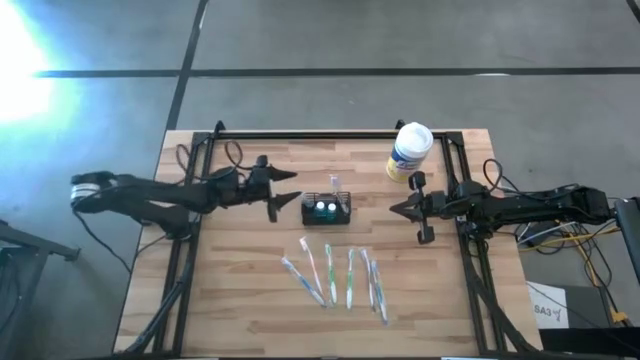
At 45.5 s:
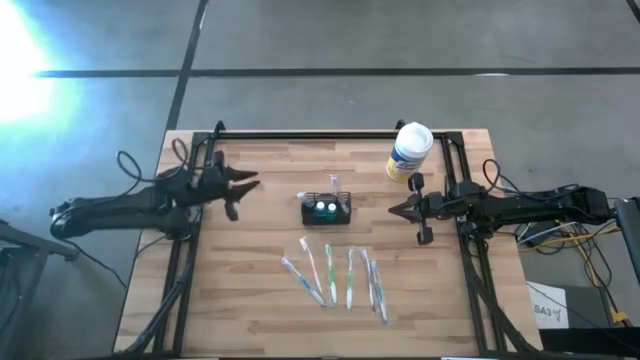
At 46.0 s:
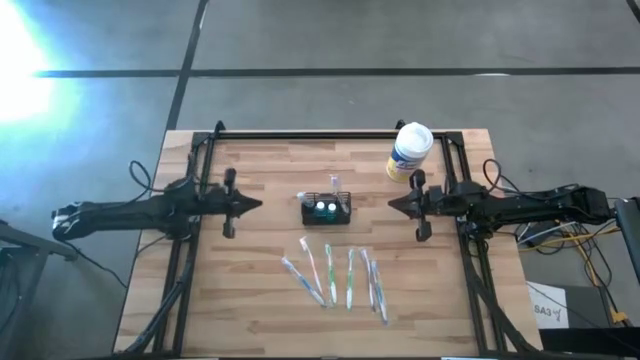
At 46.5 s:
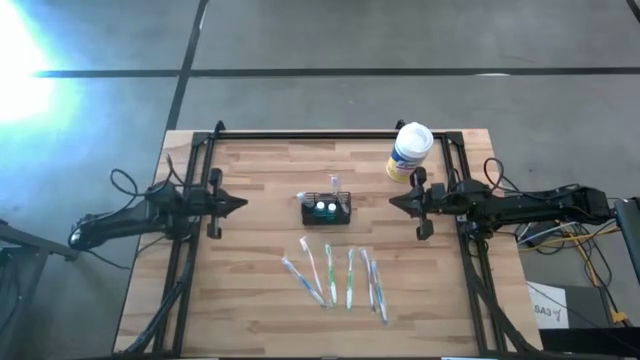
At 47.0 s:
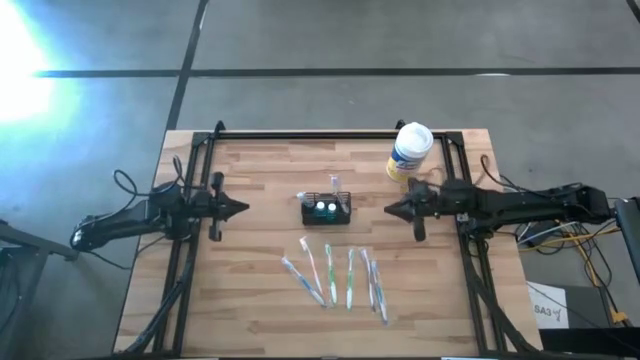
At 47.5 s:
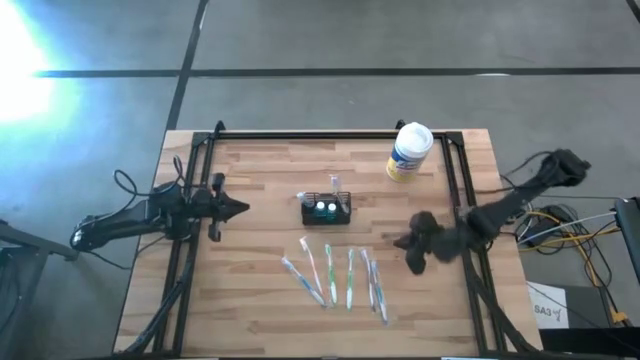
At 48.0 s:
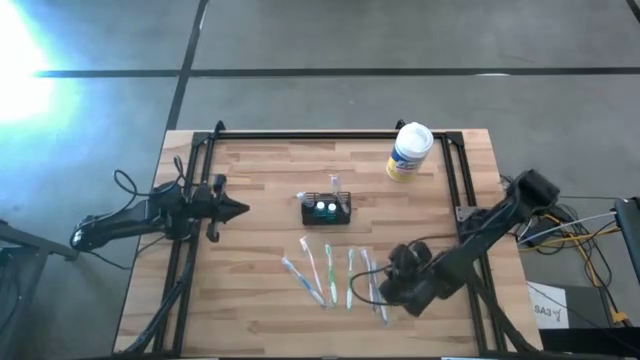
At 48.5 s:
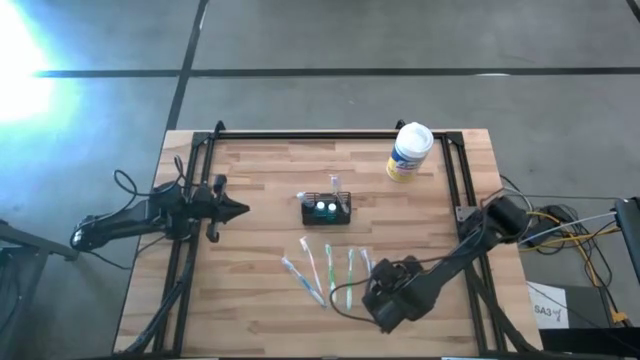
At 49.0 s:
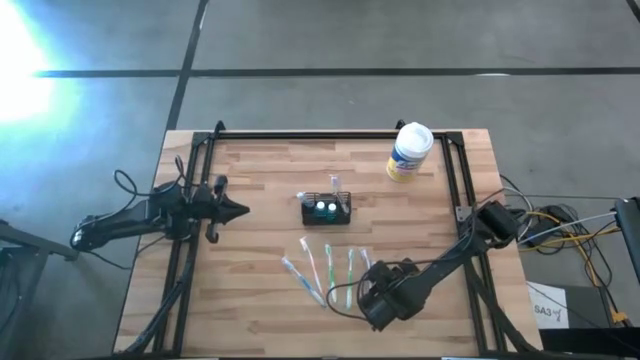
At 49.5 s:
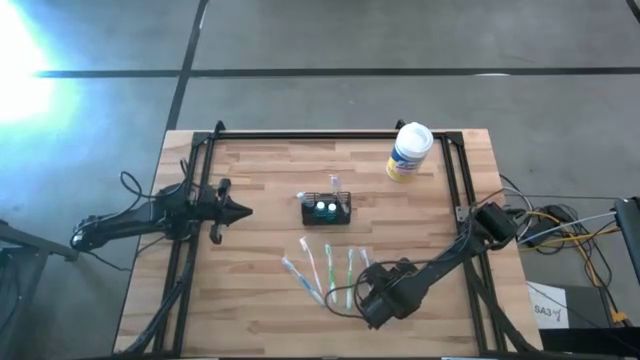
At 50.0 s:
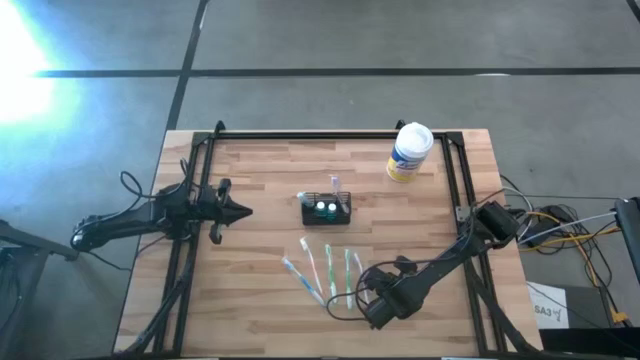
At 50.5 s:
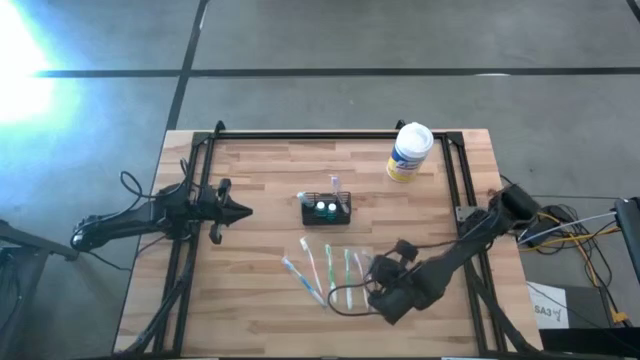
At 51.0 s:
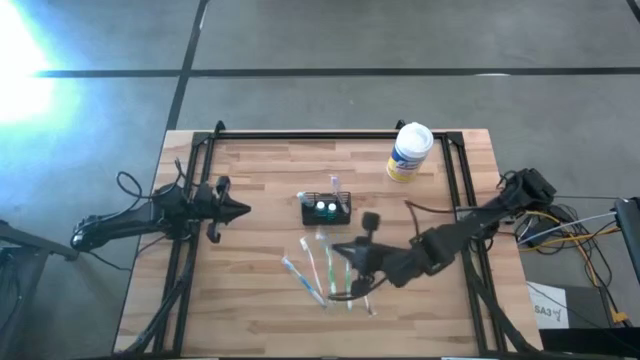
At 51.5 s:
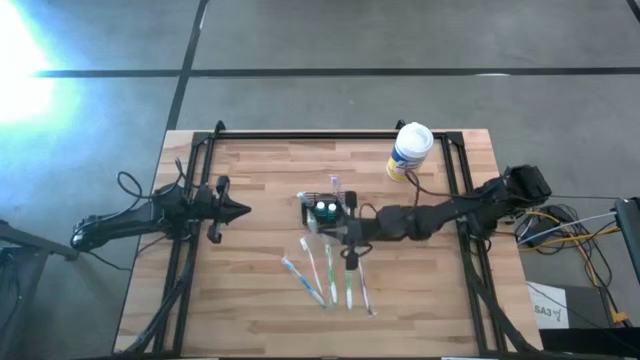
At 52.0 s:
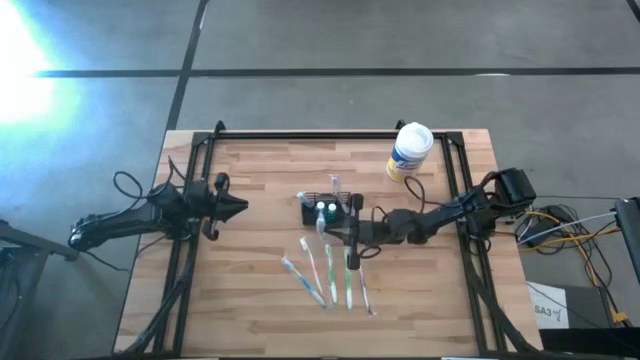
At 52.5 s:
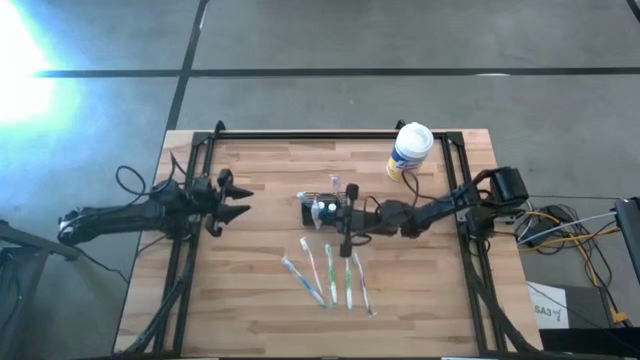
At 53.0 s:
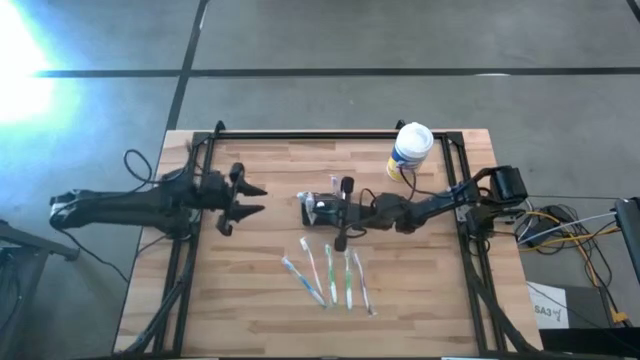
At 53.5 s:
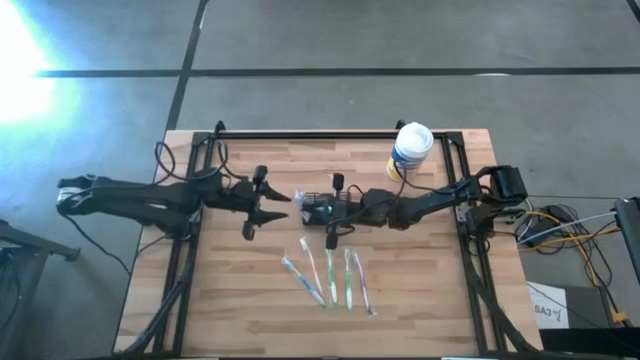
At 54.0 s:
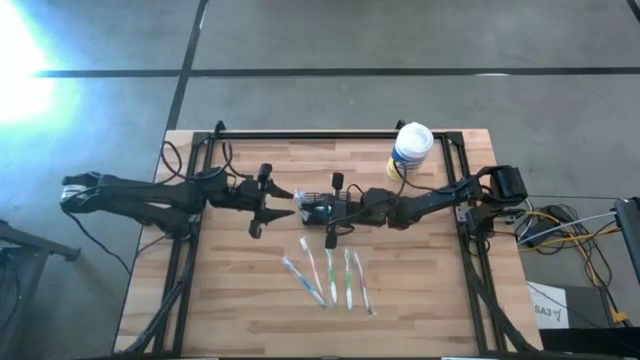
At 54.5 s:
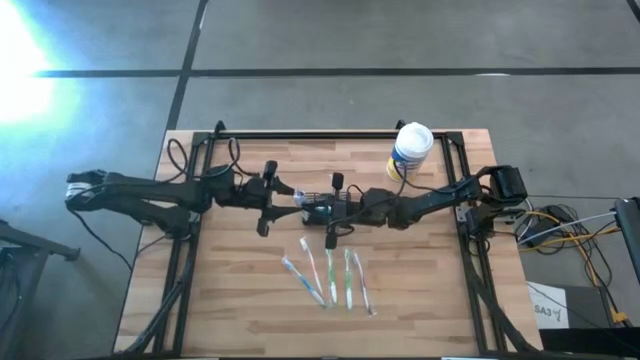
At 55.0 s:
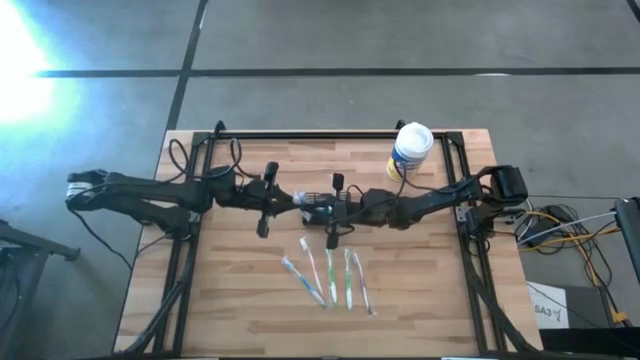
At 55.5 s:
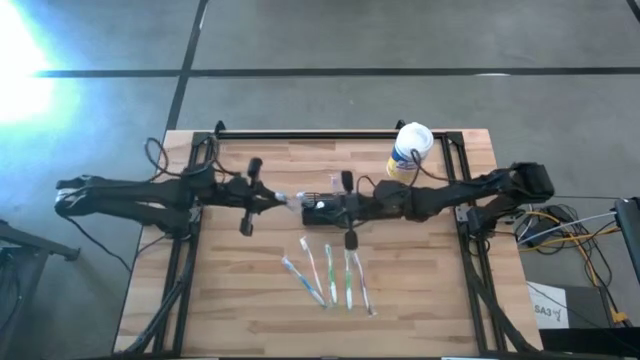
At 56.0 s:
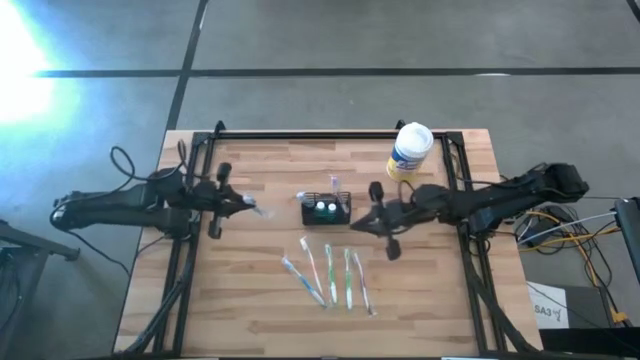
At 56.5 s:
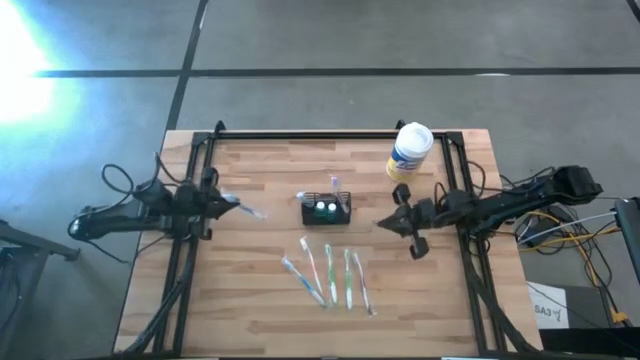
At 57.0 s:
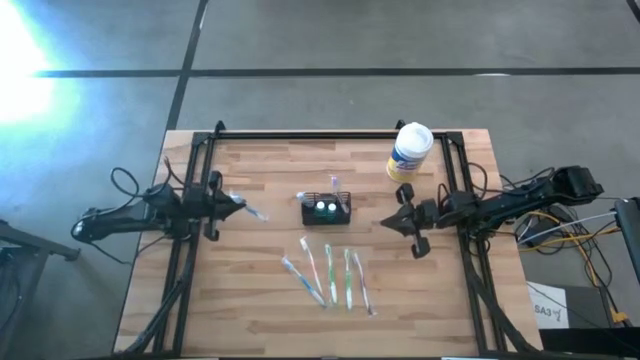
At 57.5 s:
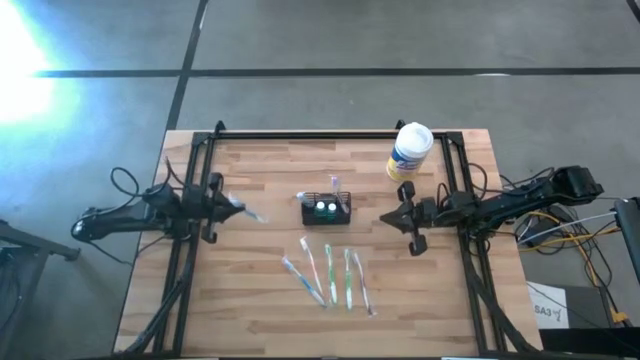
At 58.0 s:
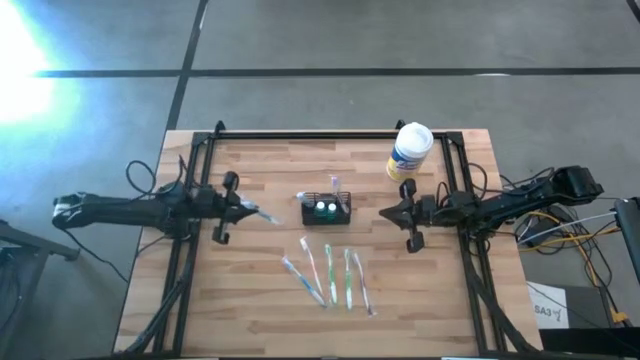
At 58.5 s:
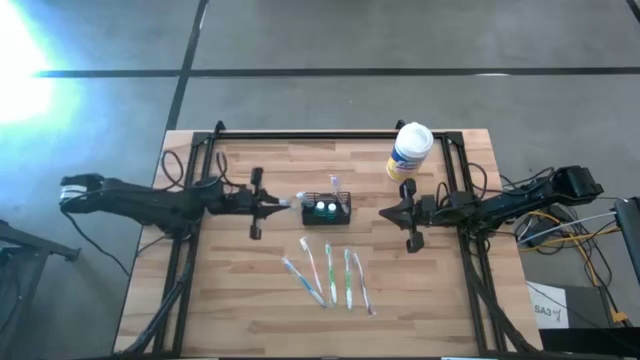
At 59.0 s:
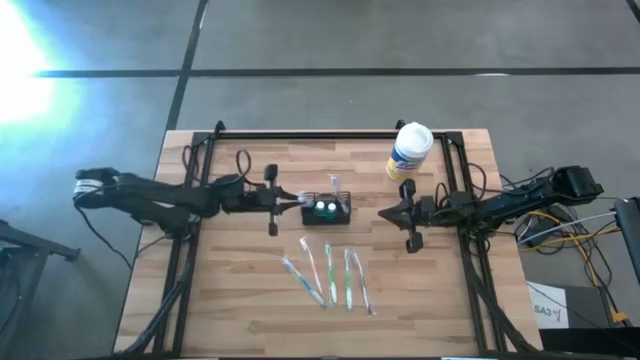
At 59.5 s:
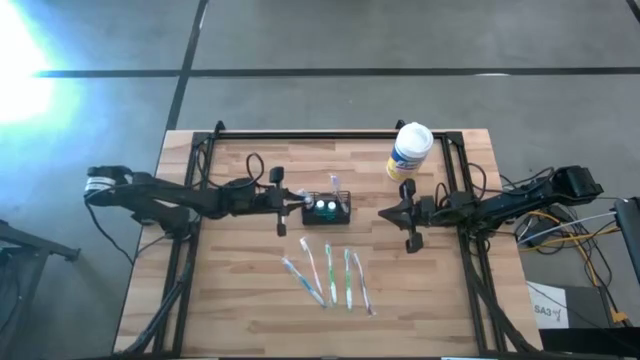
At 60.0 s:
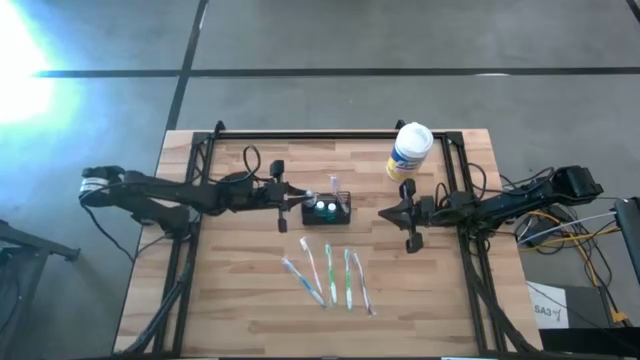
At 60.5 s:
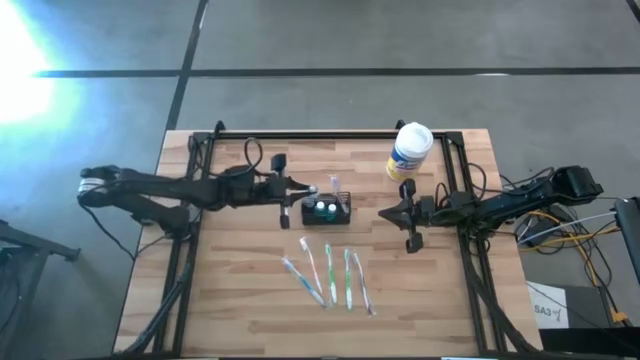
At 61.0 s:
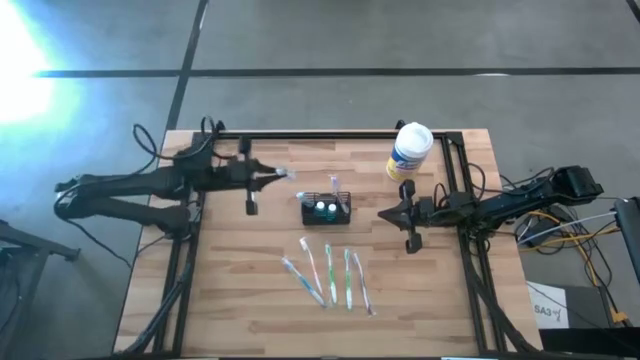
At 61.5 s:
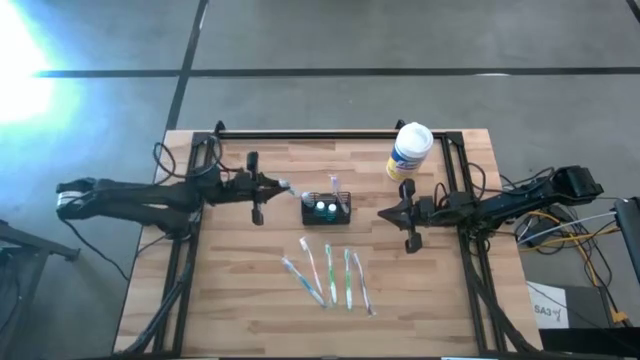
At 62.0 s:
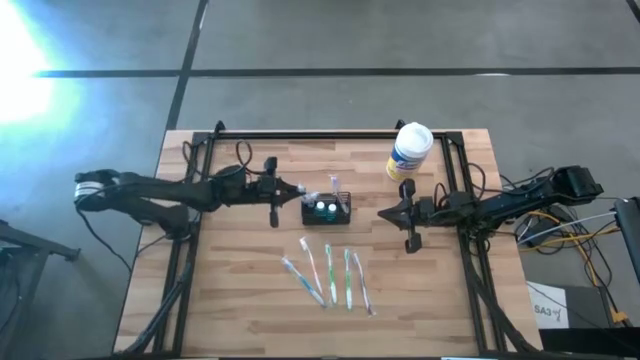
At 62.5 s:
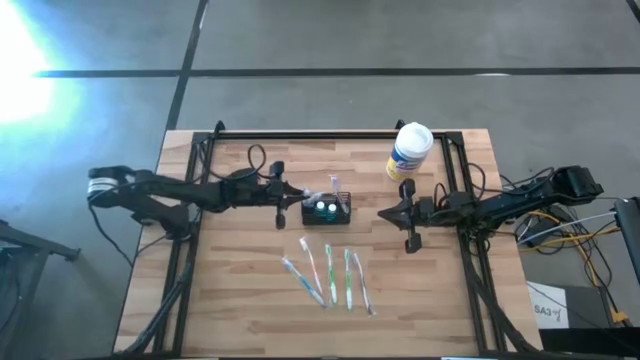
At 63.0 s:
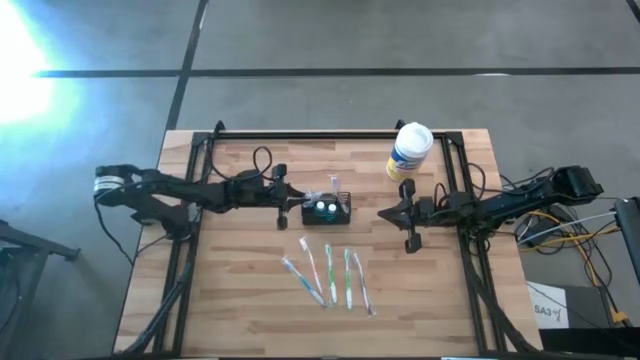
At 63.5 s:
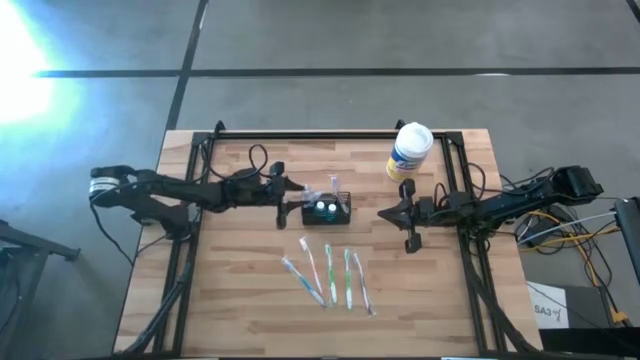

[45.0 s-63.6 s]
Task: Pick & Place toothbrushing station
Put the right blue toothbrush into the black wire organizer

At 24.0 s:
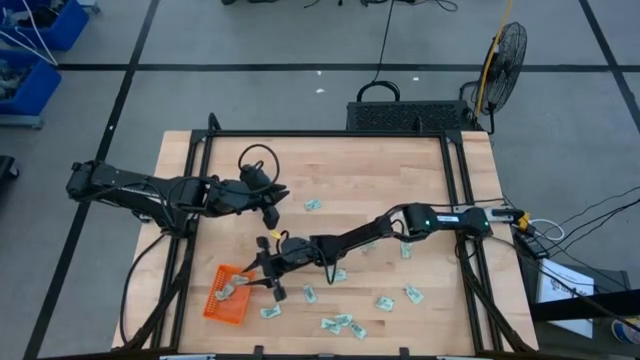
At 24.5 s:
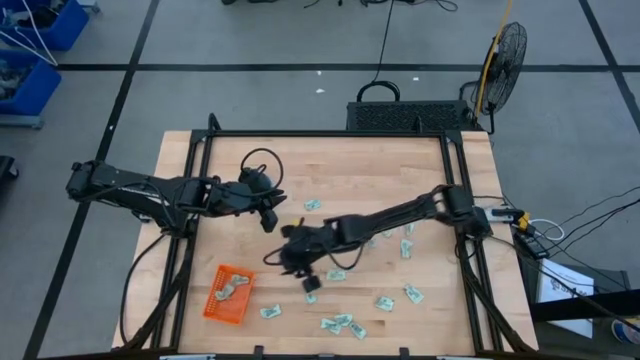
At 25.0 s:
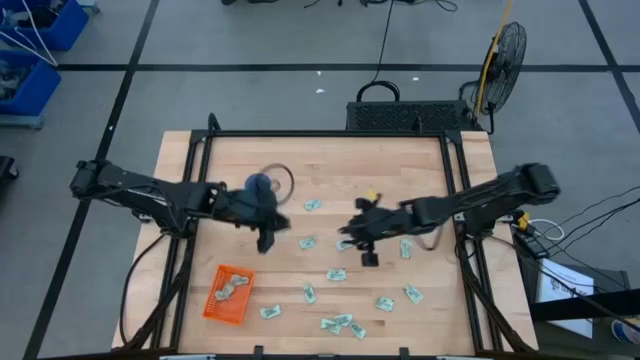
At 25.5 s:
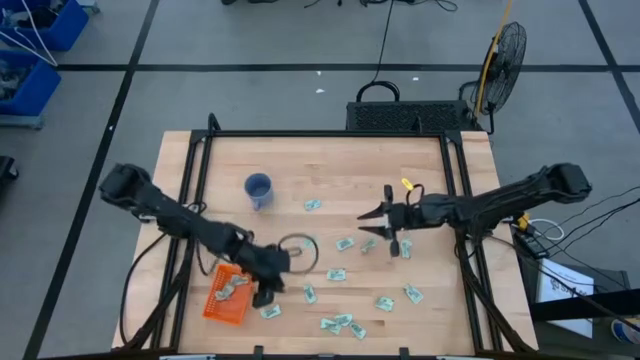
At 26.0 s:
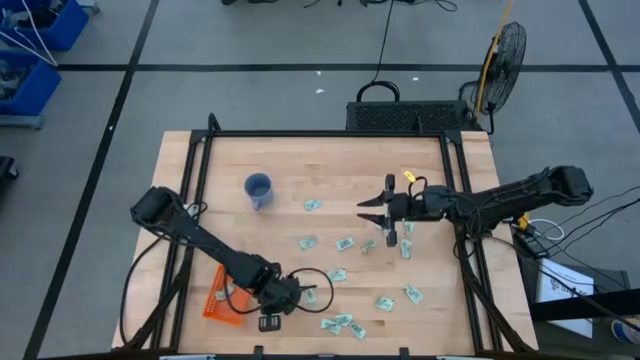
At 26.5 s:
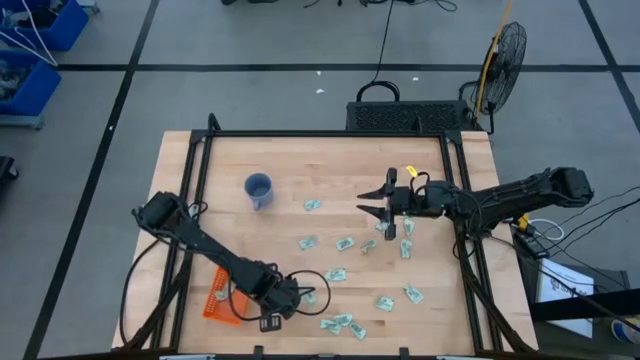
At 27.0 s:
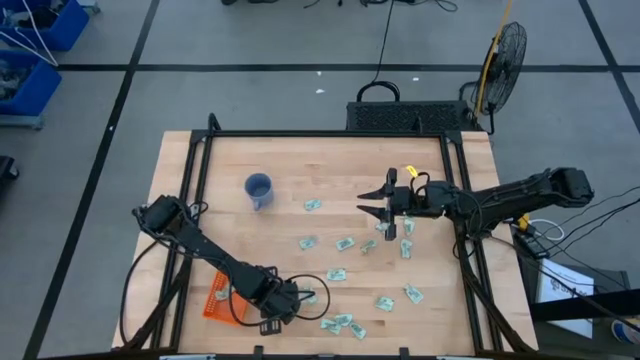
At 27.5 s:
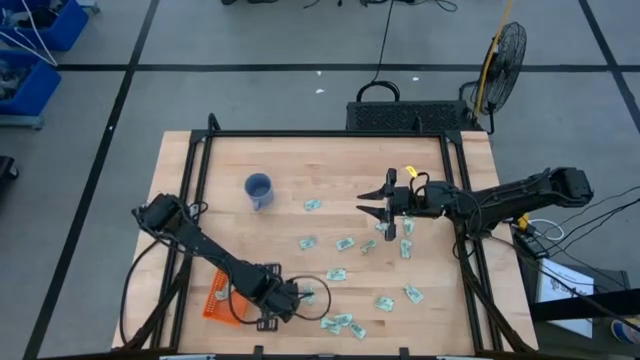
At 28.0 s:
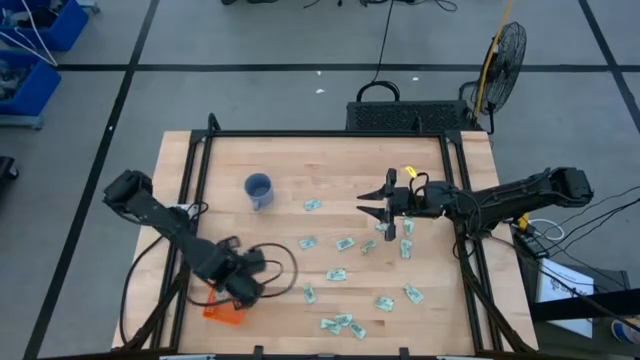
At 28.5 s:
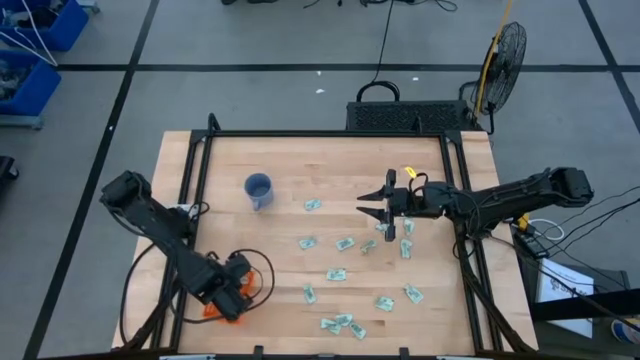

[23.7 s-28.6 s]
Task: Pick and place Stevia / Truvia into bins
Put the stevia packet into the orange bin
